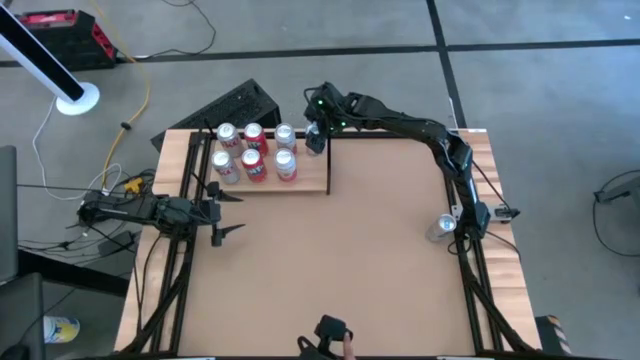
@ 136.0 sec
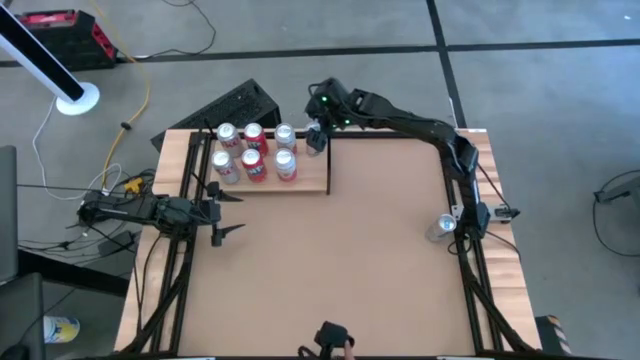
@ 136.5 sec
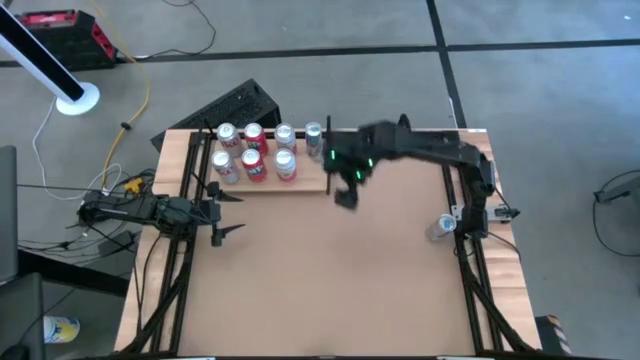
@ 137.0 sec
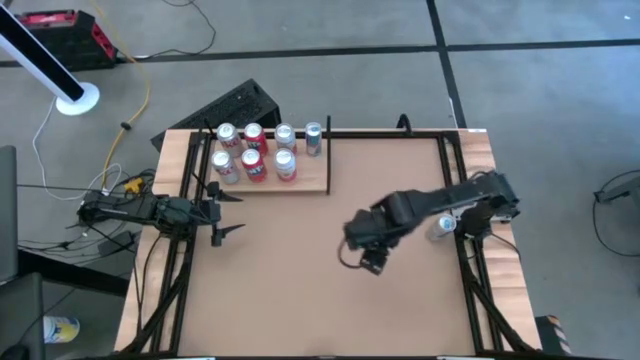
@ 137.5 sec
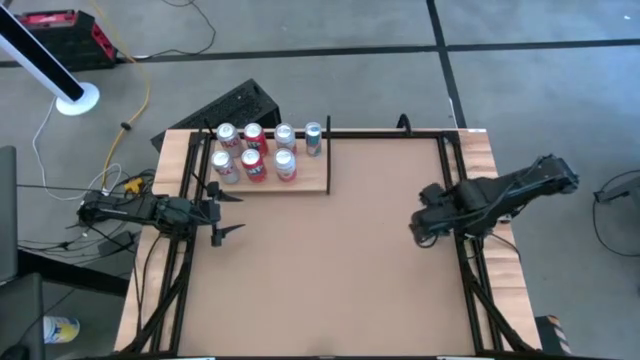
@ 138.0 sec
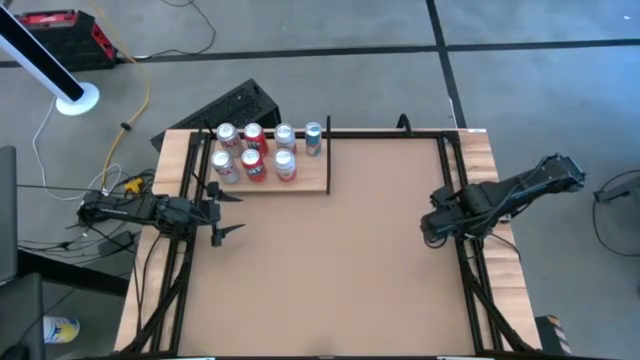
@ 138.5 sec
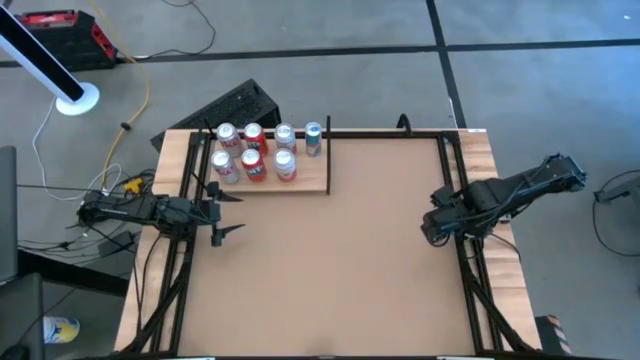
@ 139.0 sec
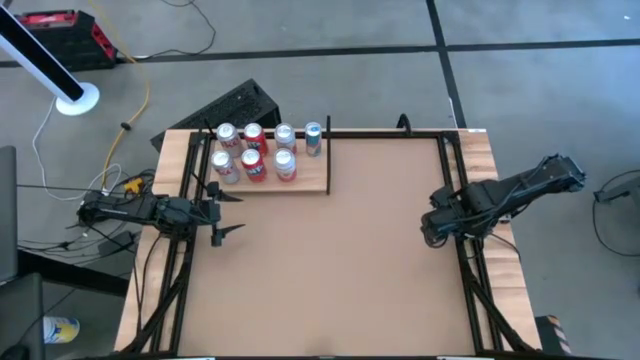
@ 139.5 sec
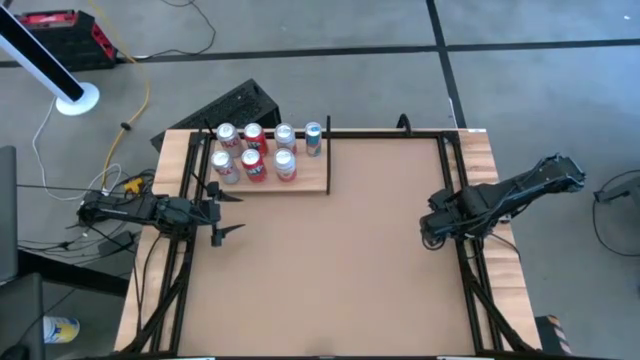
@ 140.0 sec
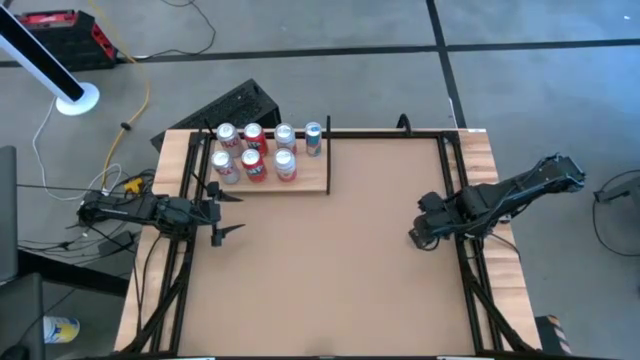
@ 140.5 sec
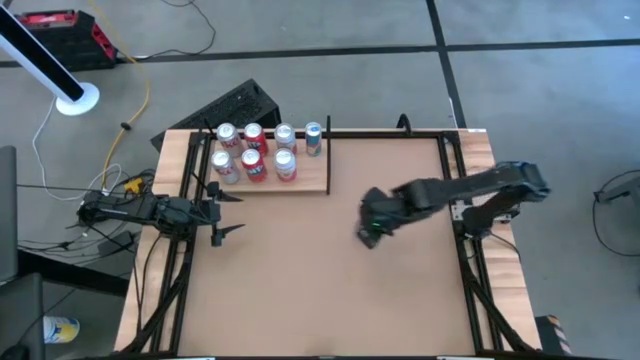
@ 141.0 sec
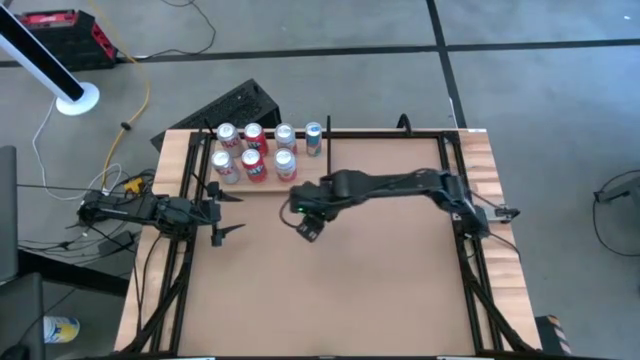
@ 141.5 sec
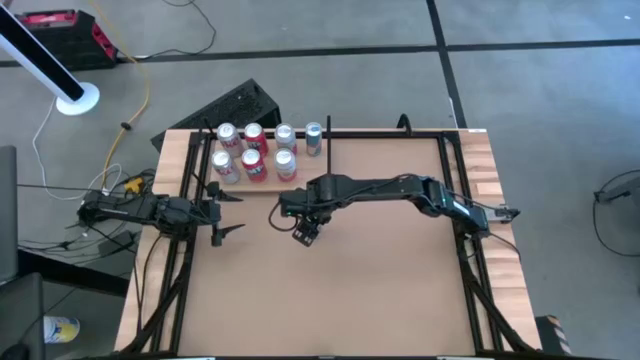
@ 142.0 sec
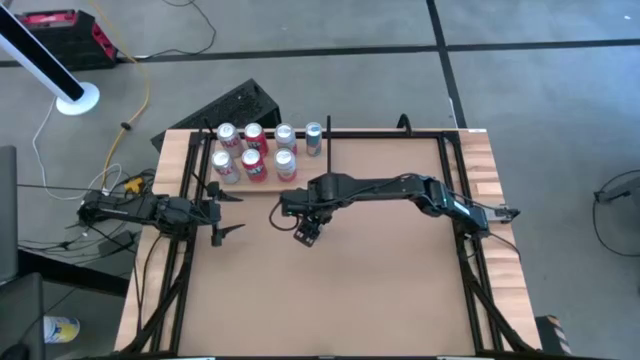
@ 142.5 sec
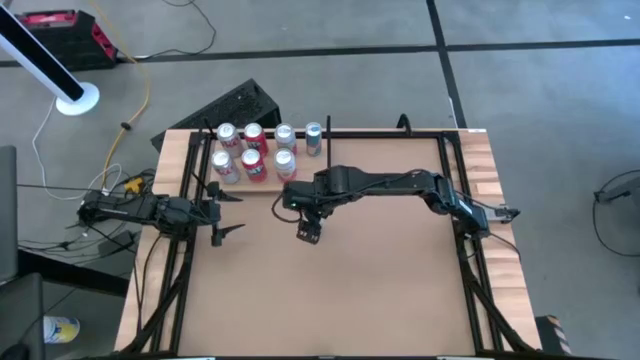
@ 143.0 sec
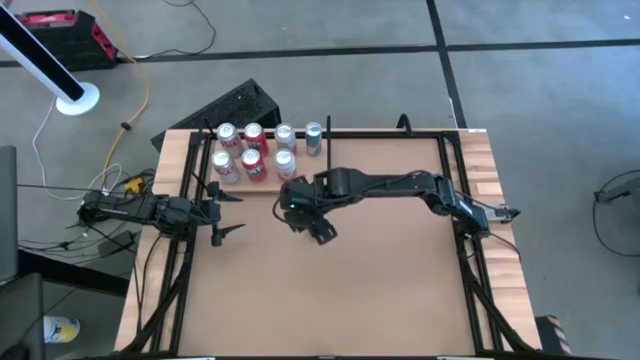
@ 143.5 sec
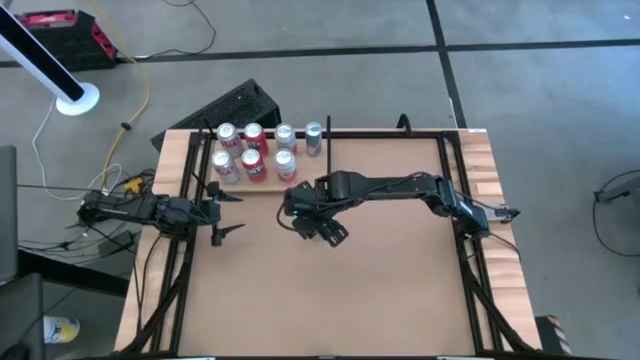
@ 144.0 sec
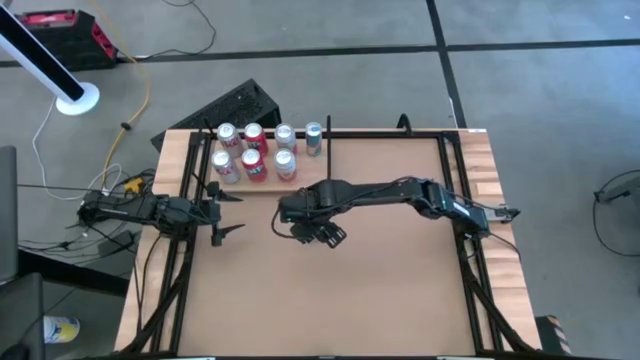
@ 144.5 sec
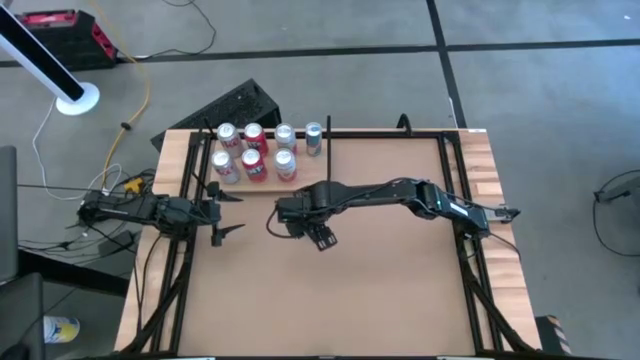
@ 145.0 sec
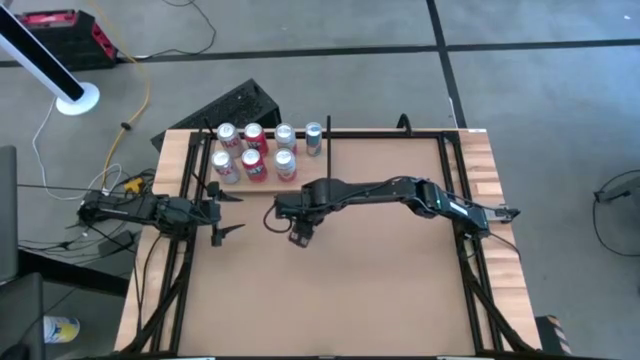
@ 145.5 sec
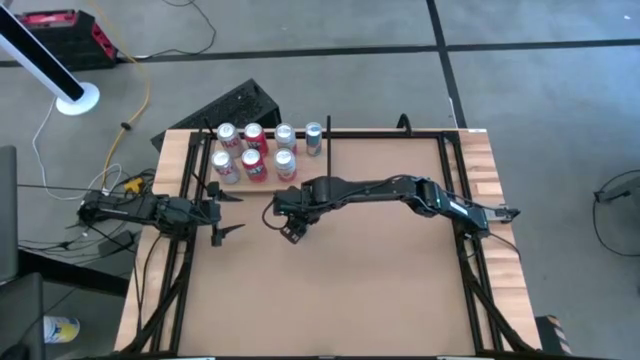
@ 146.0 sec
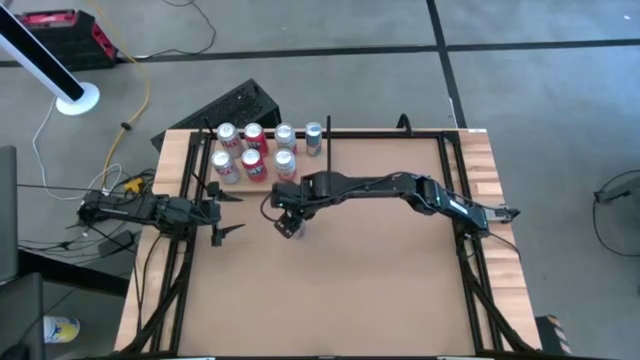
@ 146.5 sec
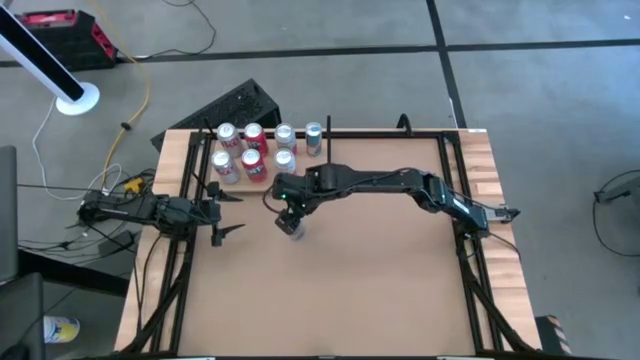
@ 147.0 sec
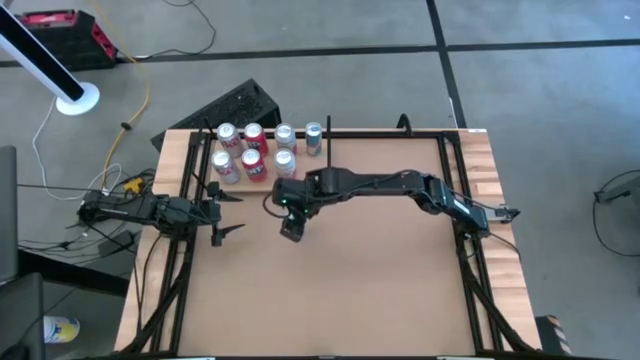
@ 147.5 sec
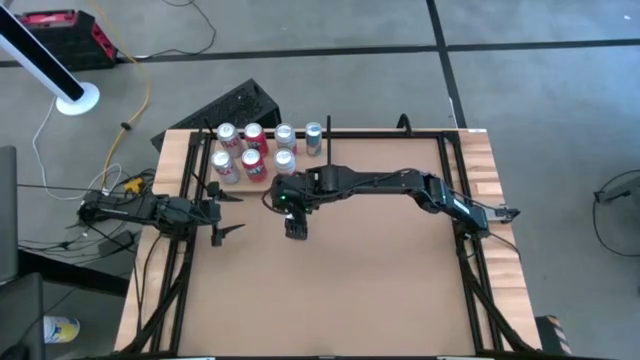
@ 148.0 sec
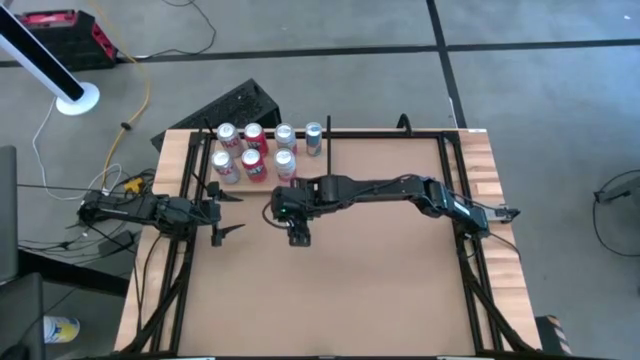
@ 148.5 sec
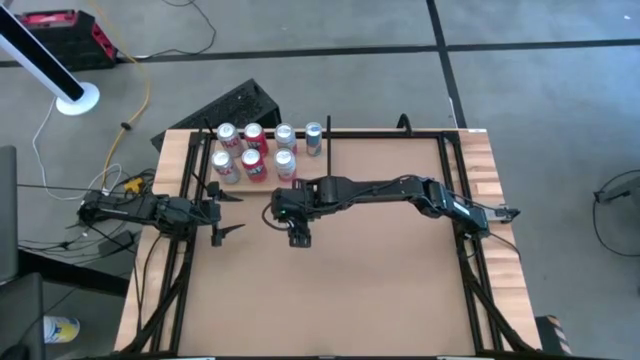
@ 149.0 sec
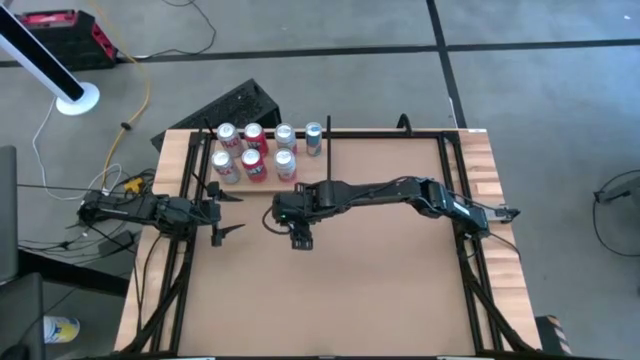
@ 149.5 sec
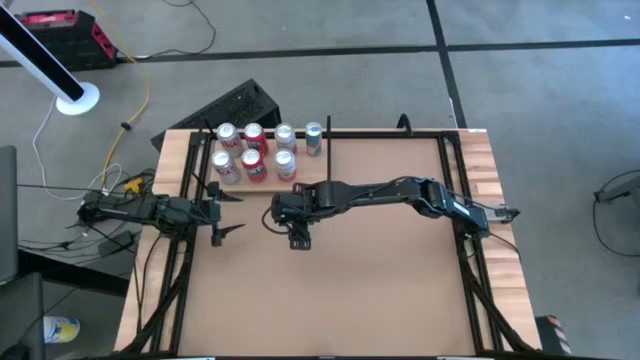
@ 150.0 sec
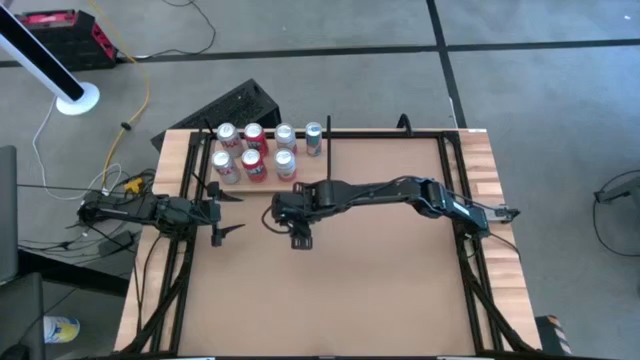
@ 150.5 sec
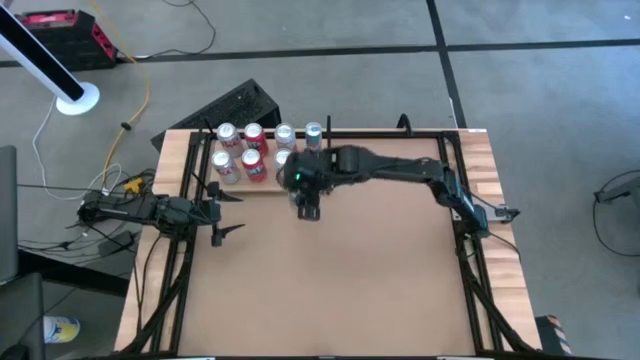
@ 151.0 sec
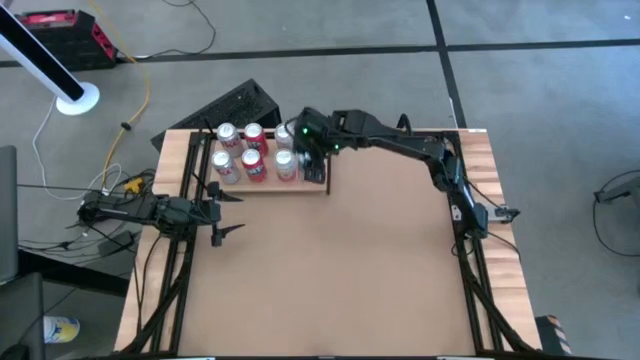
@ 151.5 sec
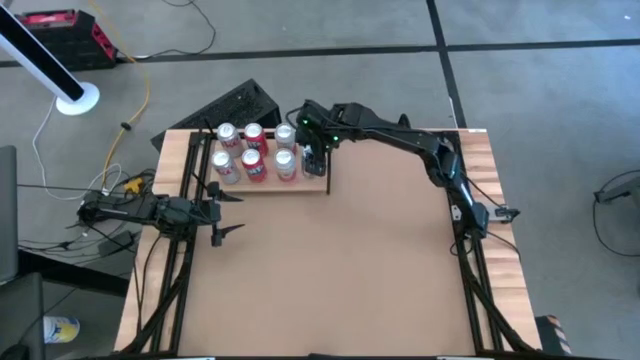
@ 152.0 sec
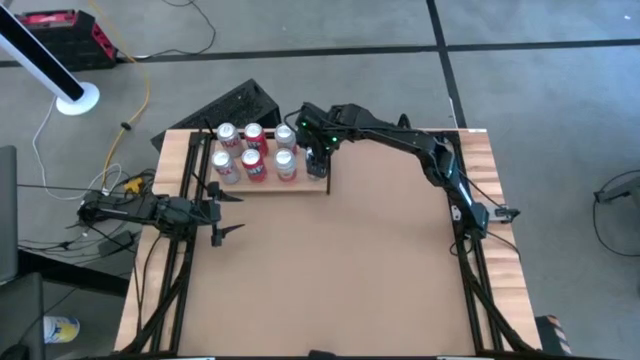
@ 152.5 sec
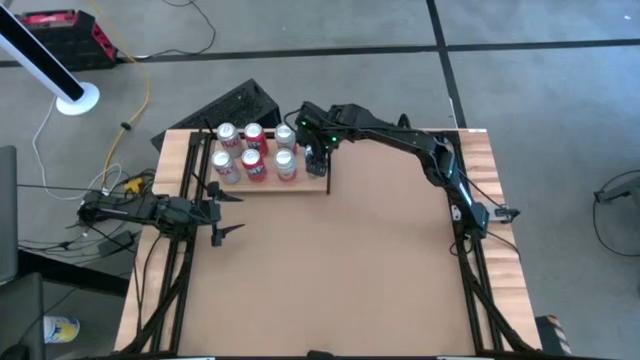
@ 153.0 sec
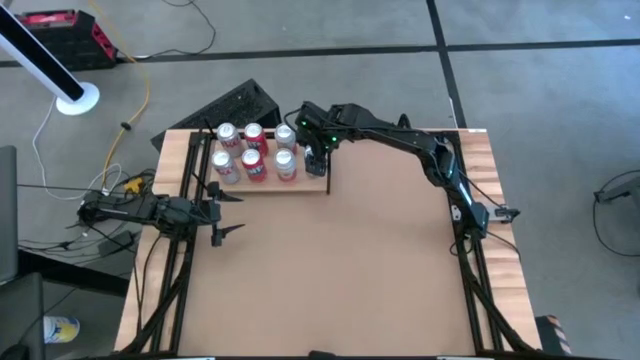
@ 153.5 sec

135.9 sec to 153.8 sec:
Task: Place canned beverage on shelf
Put the blue soda can on the shelf aligned with the other blue soda can

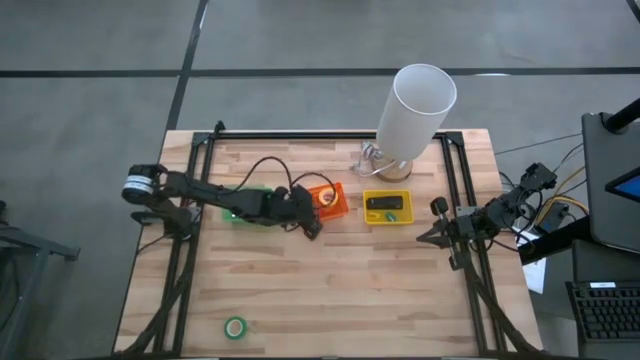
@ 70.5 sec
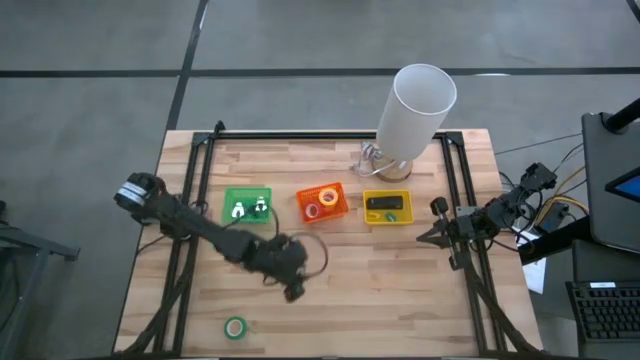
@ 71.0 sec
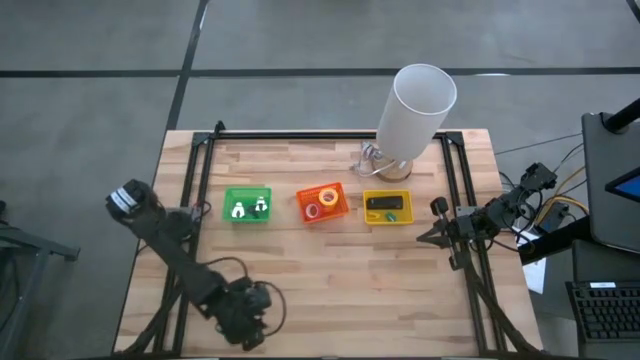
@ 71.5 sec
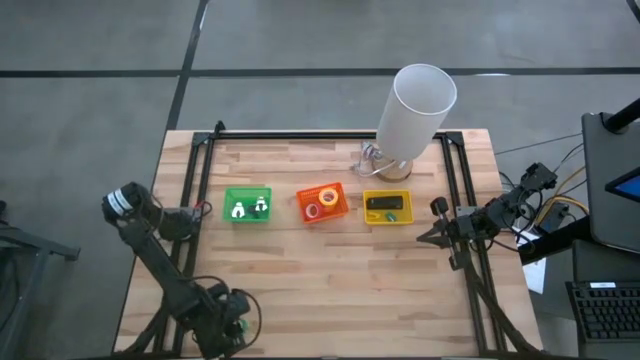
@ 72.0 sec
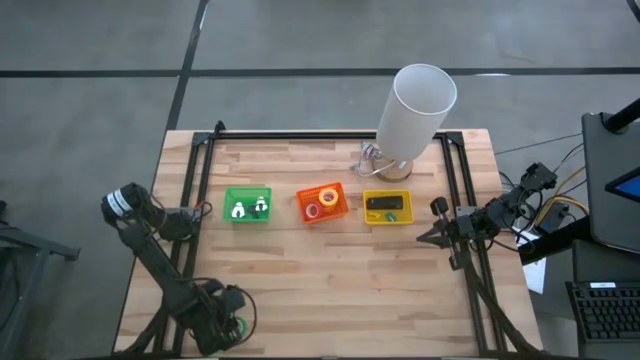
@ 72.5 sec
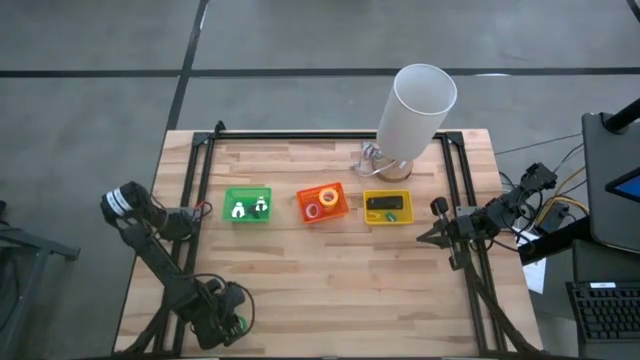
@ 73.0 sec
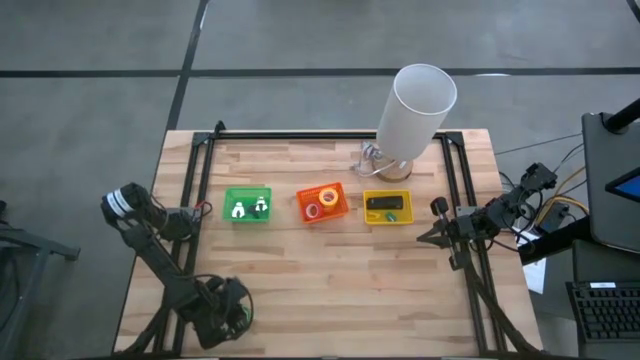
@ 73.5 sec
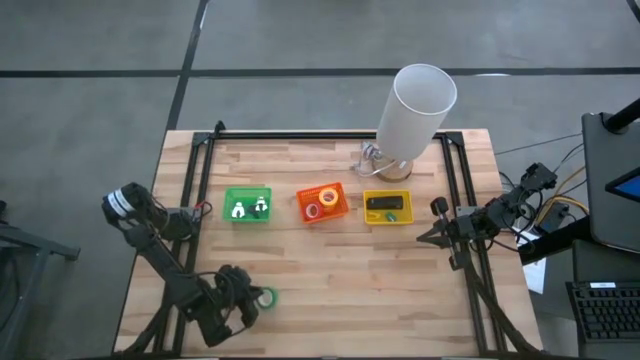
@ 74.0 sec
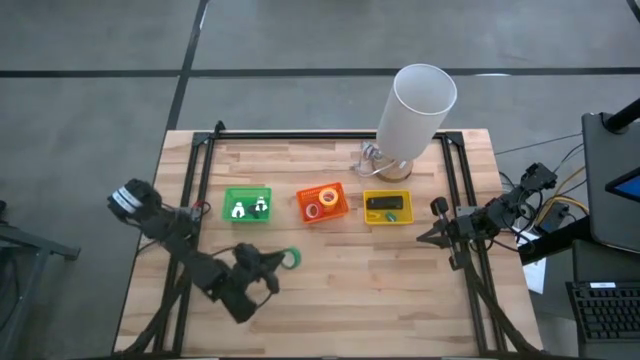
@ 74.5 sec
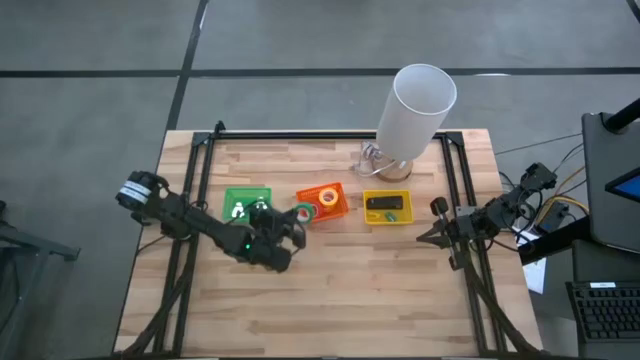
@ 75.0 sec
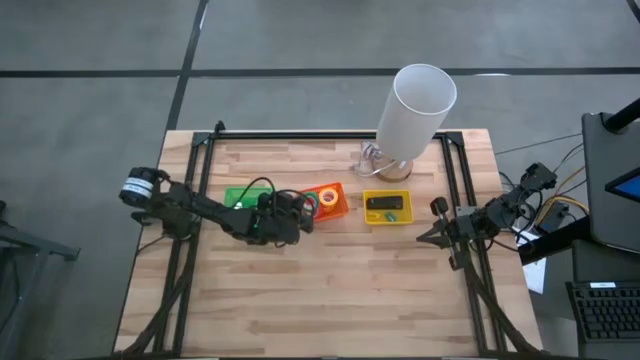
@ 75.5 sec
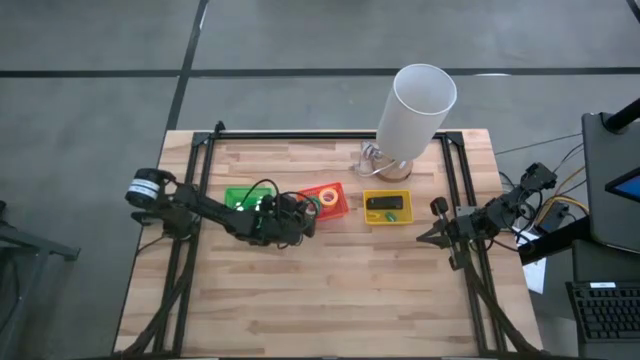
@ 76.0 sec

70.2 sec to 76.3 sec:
Task: Pick and place Stapler, Stapler remover, tape
Put the green tape into the orange basket
